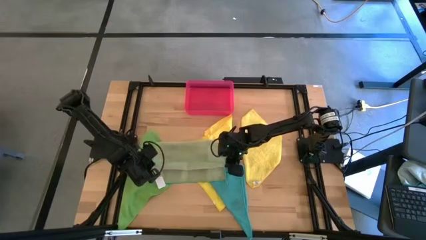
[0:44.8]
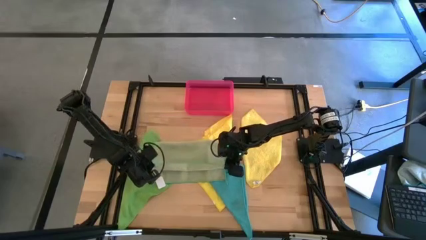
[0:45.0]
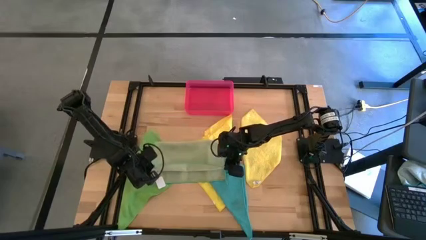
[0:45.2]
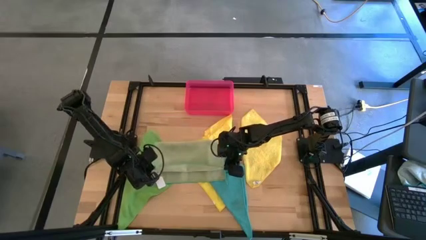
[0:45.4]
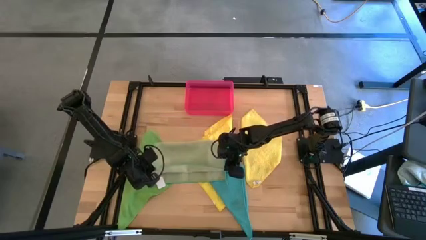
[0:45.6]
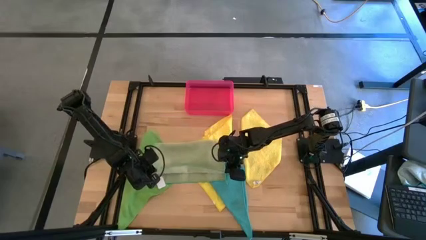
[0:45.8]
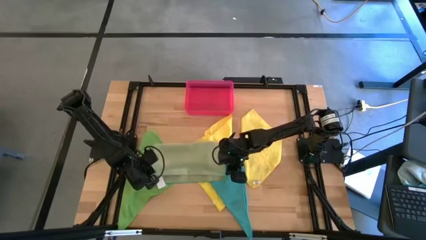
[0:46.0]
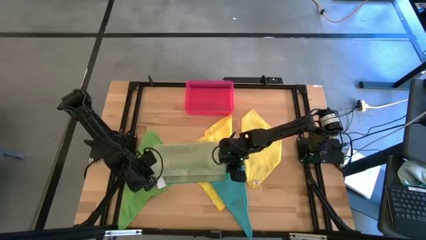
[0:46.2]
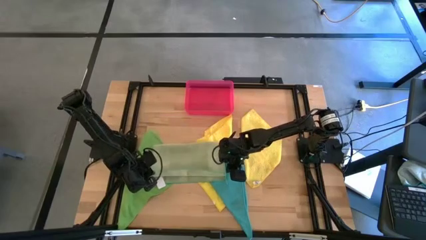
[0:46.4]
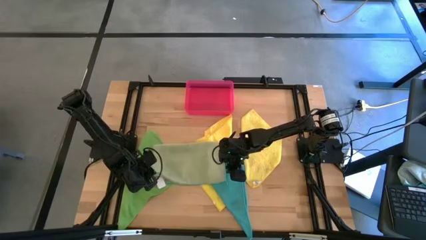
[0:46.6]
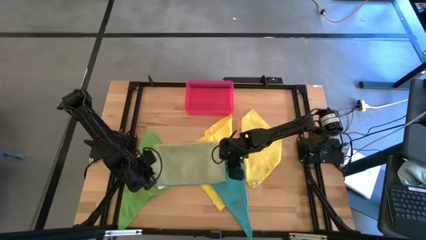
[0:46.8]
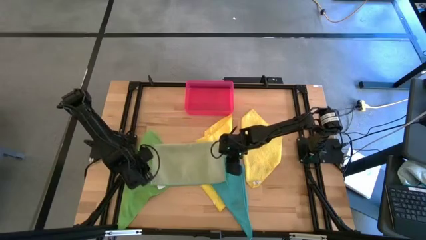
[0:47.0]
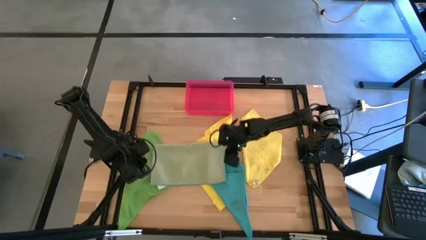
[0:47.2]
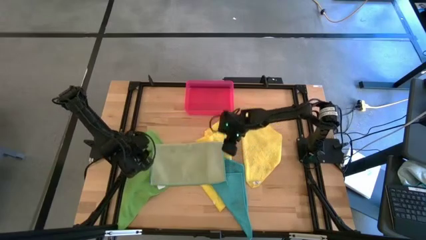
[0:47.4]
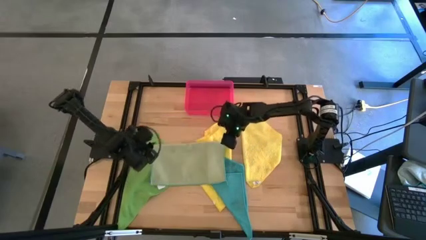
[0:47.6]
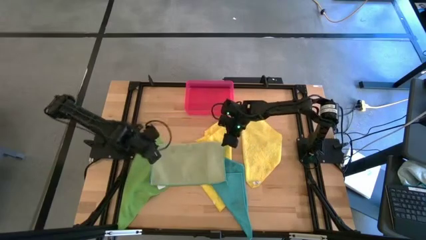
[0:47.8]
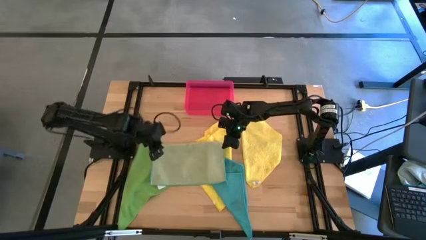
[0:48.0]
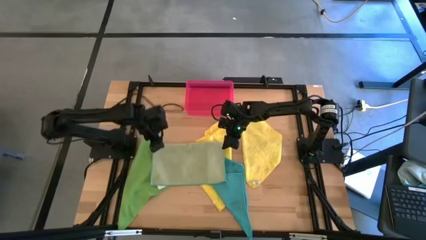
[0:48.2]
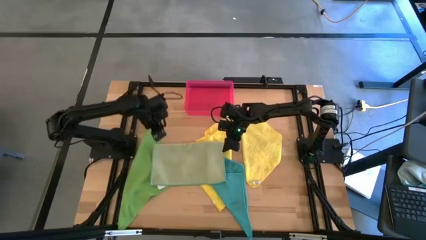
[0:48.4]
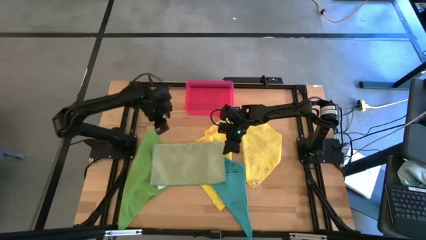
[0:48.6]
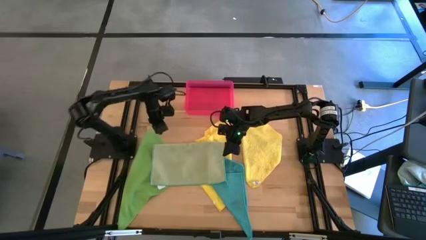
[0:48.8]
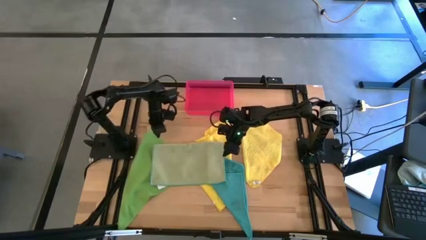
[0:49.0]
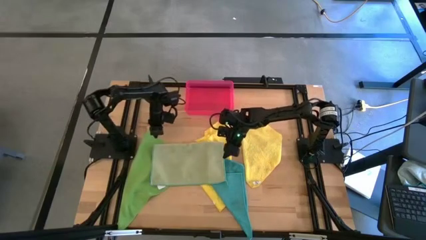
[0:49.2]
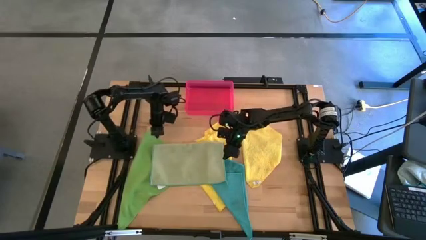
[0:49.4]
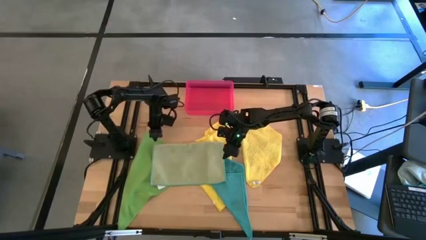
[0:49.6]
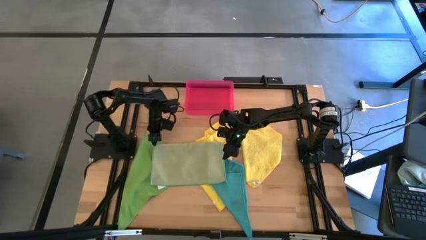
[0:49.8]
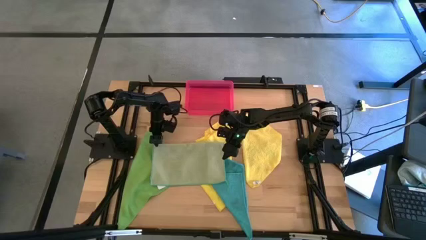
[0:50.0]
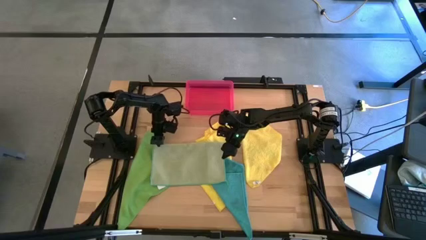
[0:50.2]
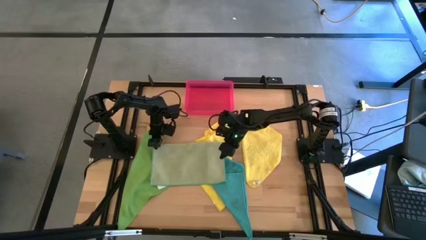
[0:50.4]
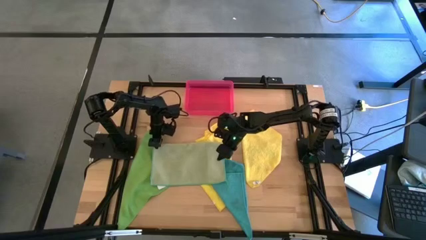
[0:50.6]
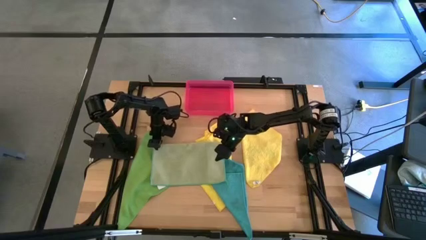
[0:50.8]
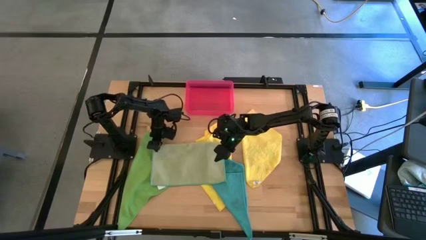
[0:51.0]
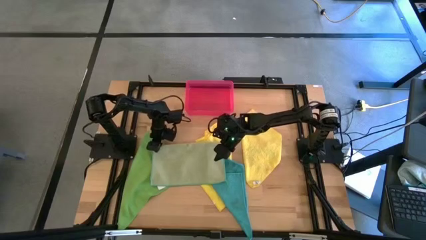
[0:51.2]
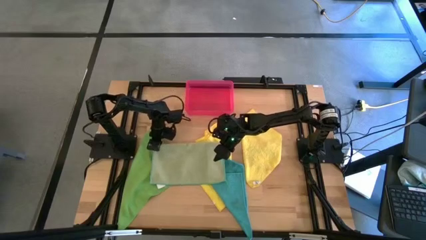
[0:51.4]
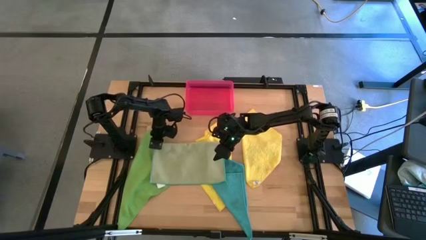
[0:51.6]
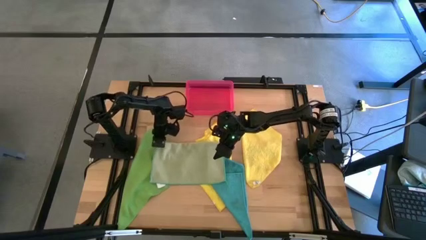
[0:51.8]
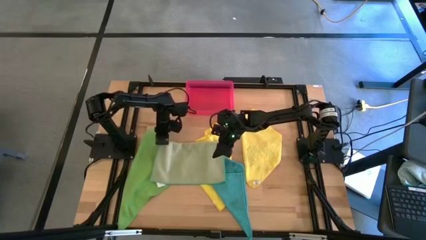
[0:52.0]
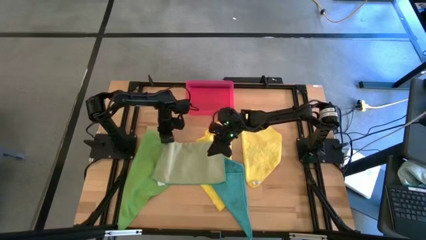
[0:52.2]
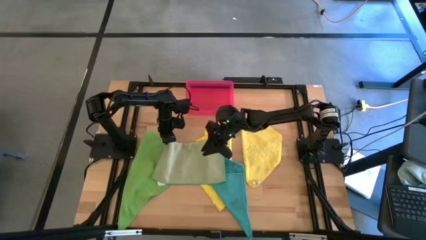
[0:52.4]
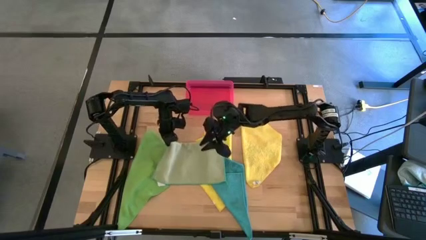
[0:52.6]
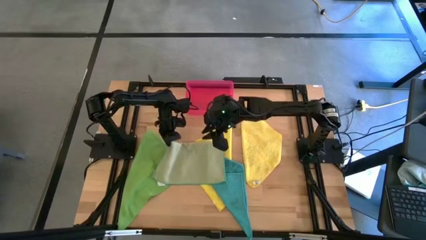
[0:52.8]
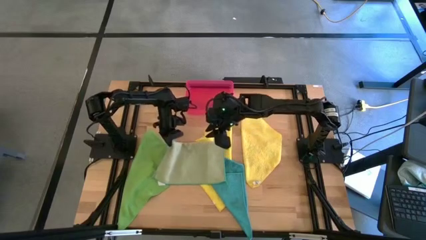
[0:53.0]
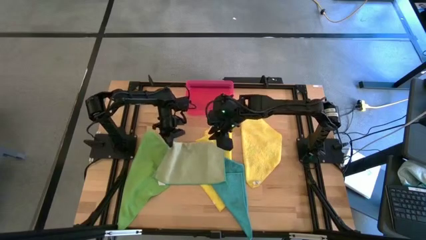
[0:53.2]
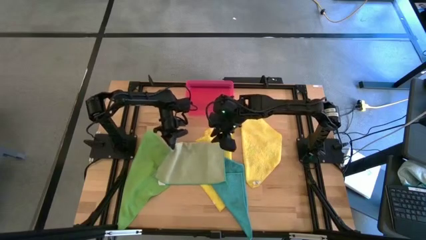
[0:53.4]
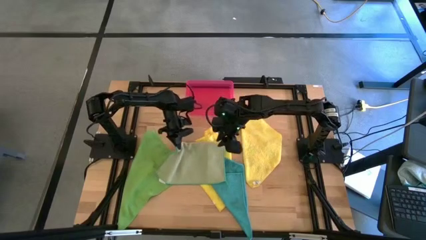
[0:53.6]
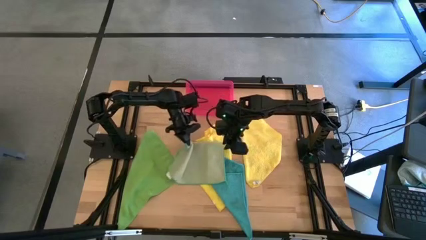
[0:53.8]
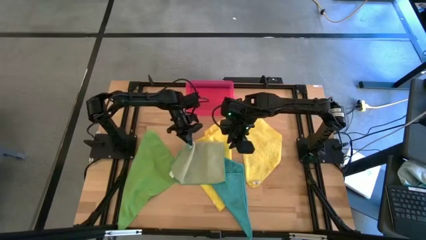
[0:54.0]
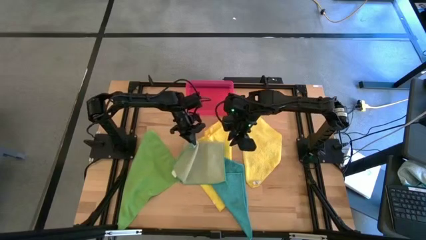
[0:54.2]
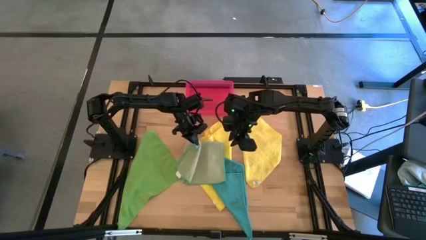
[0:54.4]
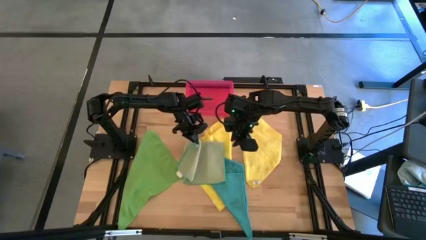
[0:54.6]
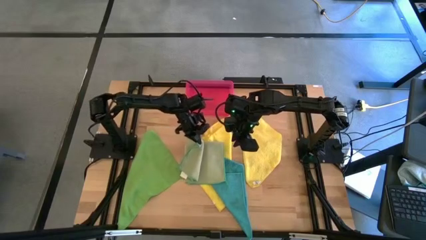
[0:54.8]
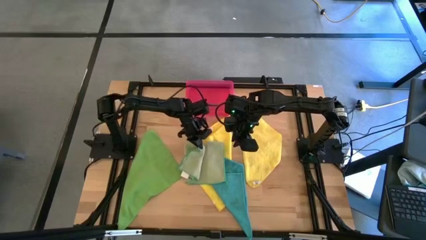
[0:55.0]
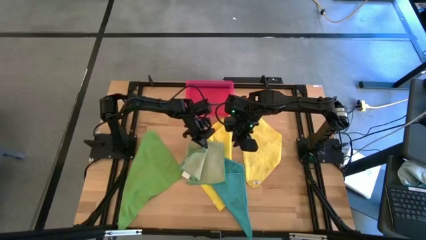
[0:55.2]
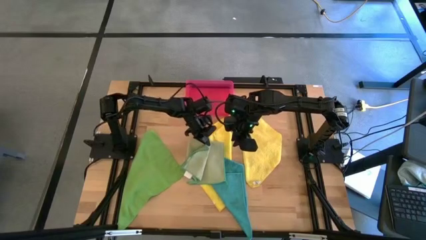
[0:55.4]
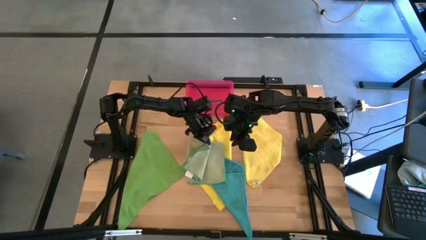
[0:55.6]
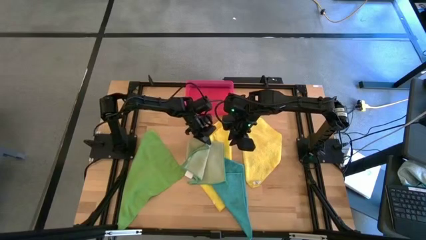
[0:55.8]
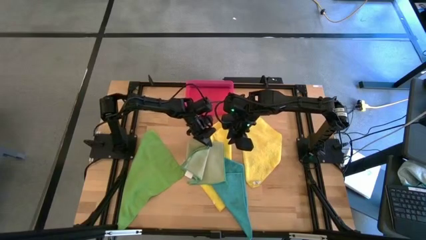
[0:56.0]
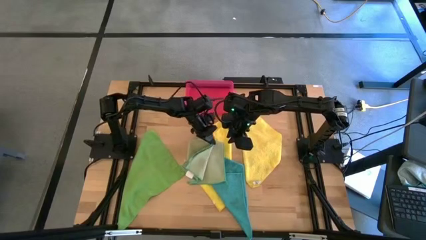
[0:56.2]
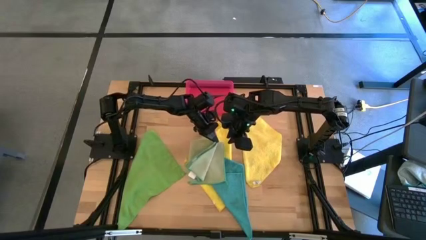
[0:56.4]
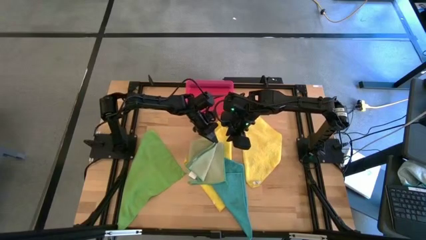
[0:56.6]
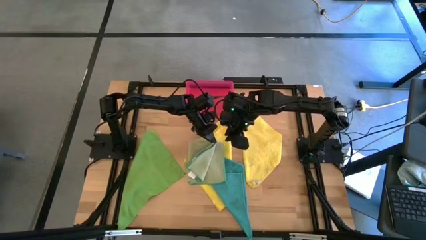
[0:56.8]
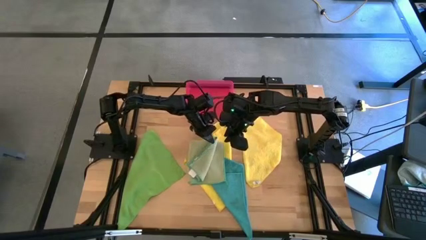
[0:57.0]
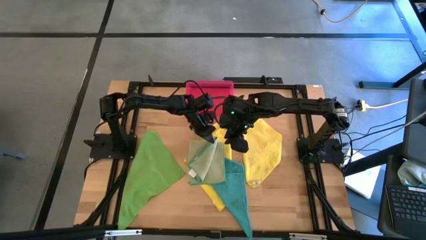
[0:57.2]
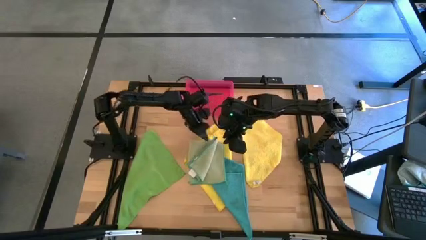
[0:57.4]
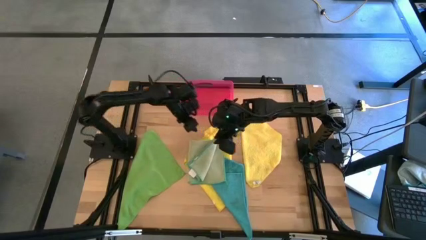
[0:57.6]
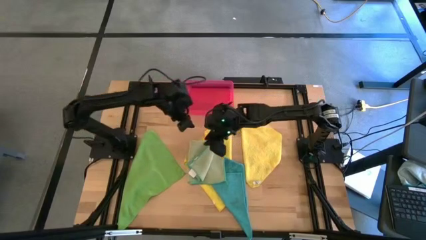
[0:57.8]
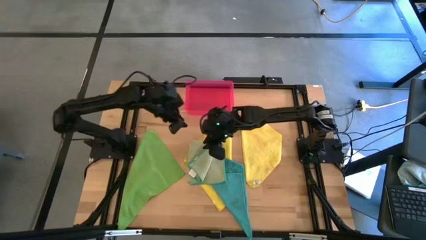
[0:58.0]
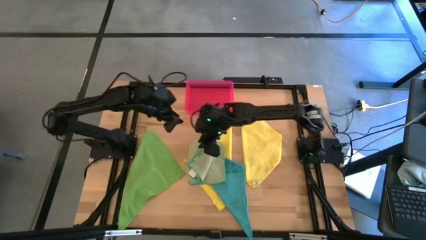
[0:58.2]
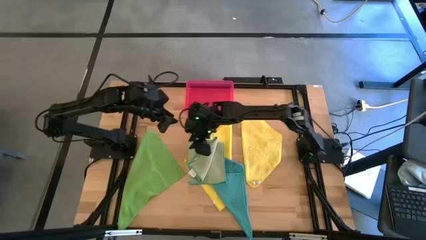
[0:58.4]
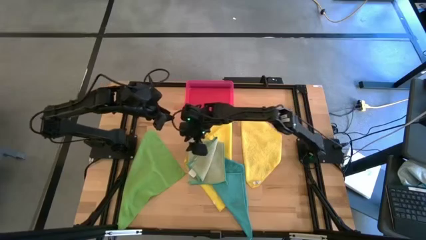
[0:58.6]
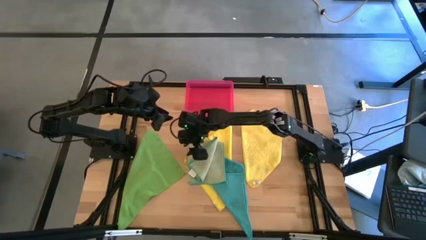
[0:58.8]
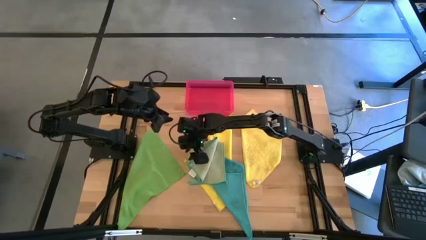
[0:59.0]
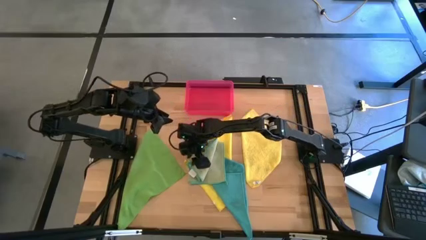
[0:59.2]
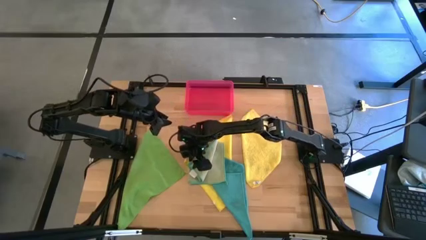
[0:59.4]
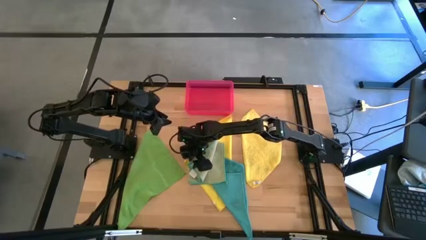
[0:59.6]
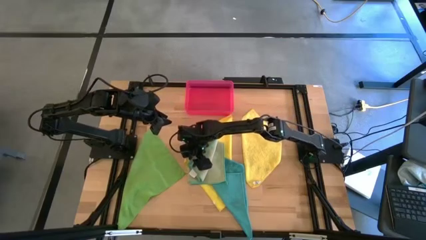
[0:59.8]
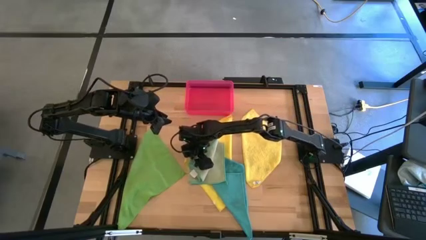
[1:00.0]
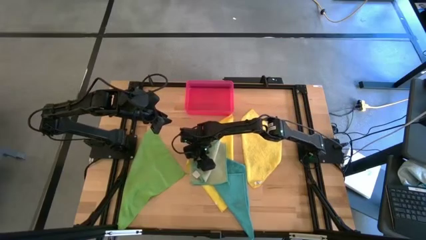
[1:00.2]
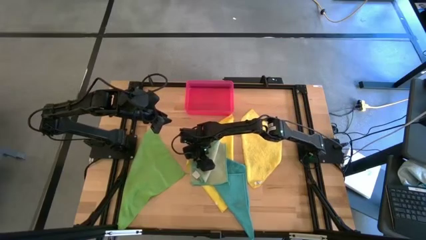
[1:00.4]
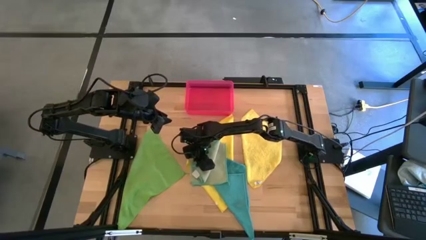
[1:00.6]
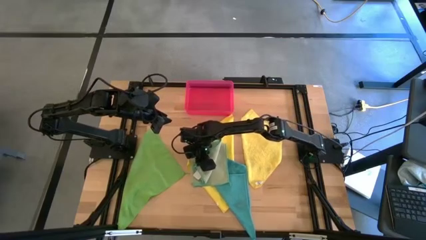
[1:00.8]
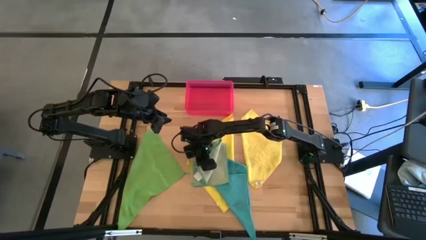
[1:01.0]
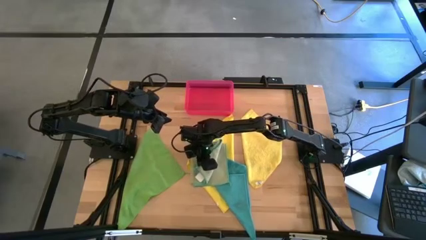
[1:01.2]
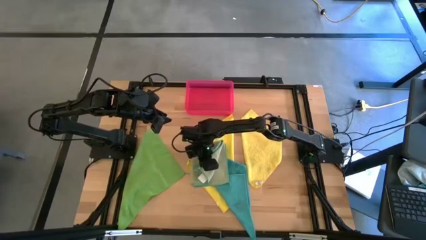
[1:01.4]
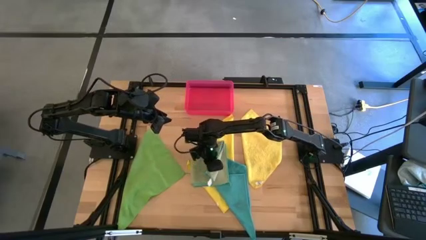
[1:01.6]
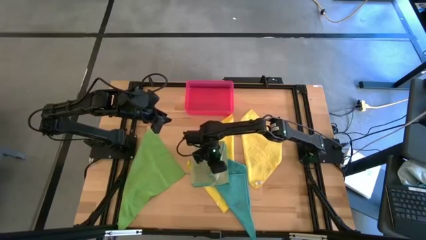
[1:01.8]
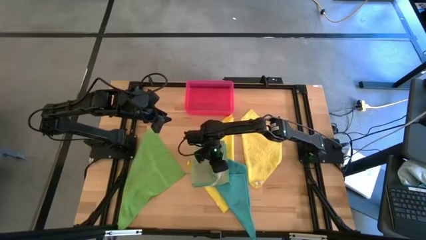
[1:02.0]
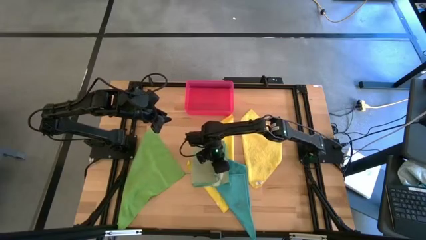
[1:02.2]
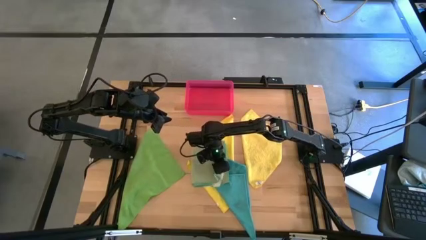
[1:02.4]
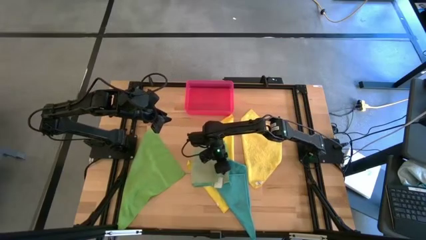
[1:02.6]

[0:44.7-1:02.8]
Task: Fold microfiber towels
Fold the light green microfiber cloth
